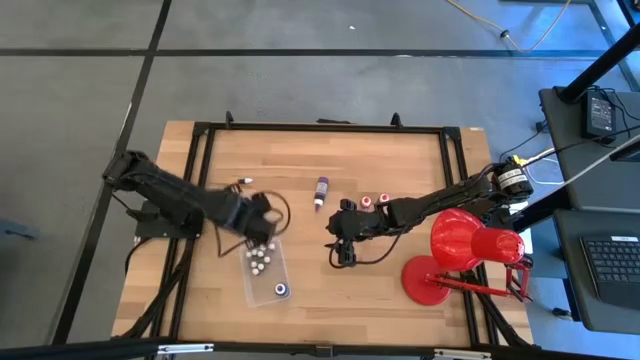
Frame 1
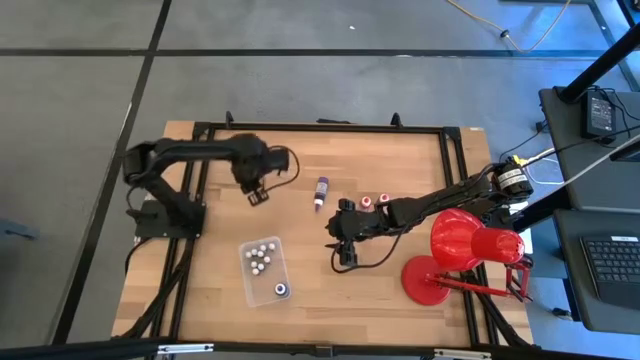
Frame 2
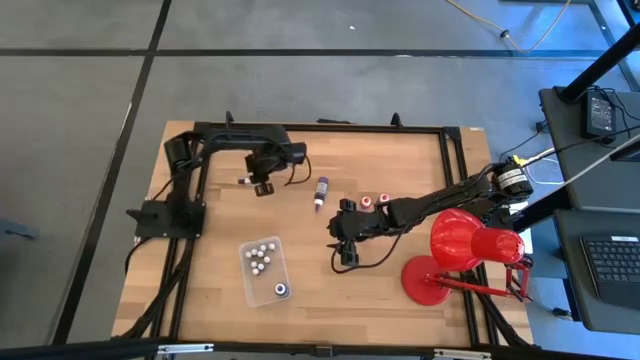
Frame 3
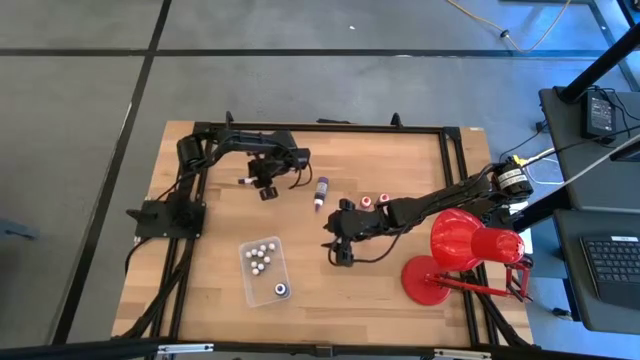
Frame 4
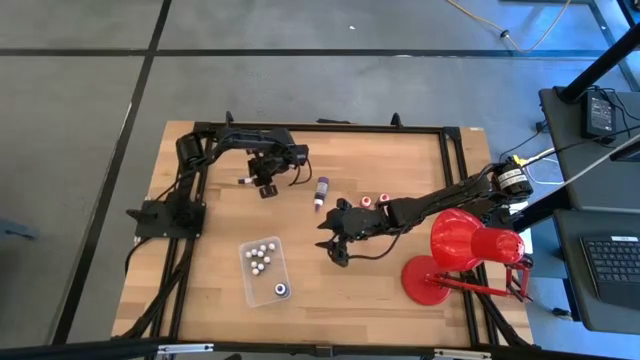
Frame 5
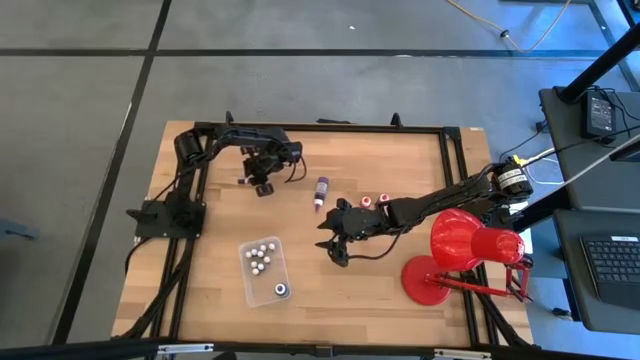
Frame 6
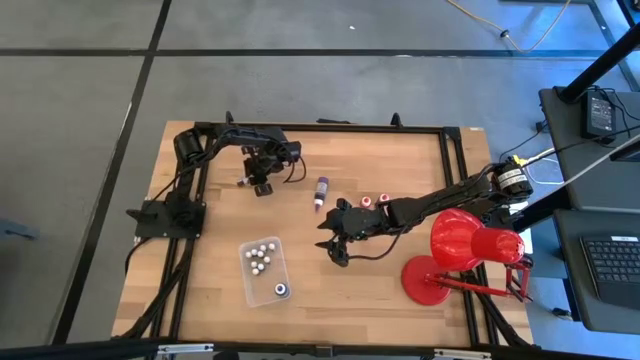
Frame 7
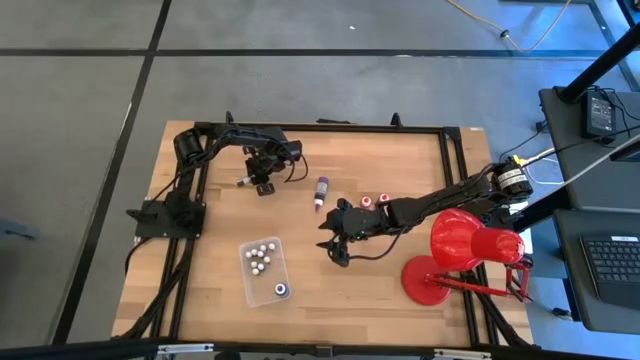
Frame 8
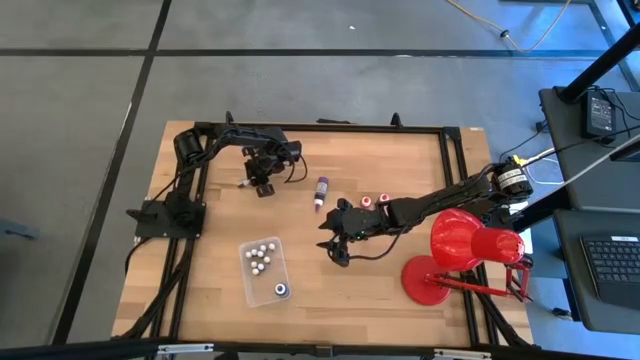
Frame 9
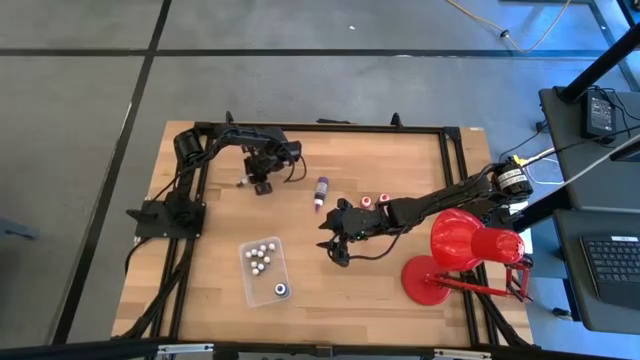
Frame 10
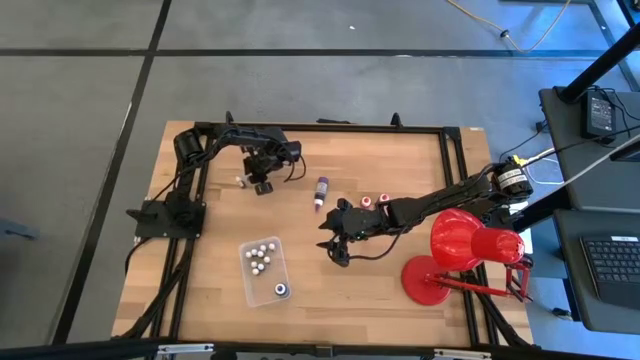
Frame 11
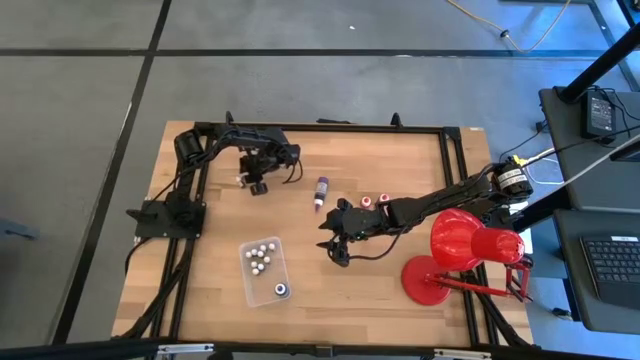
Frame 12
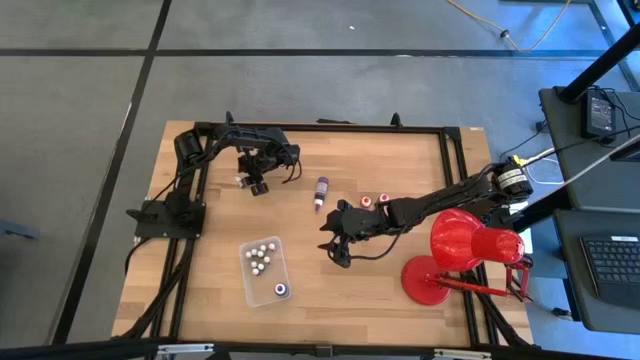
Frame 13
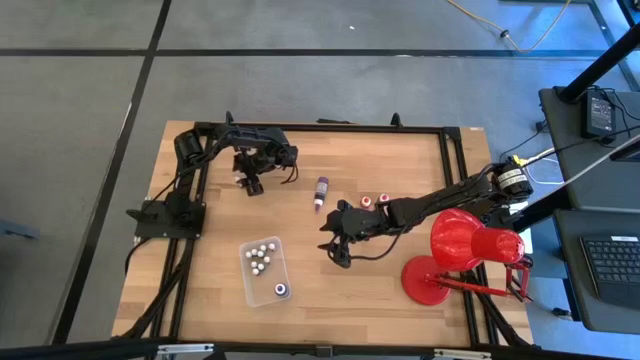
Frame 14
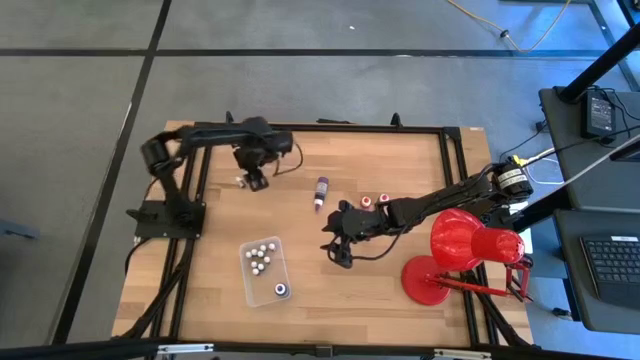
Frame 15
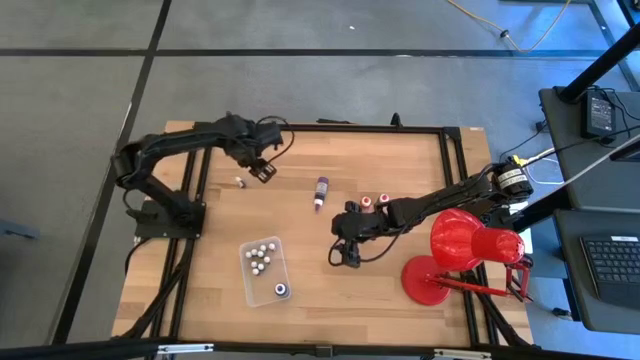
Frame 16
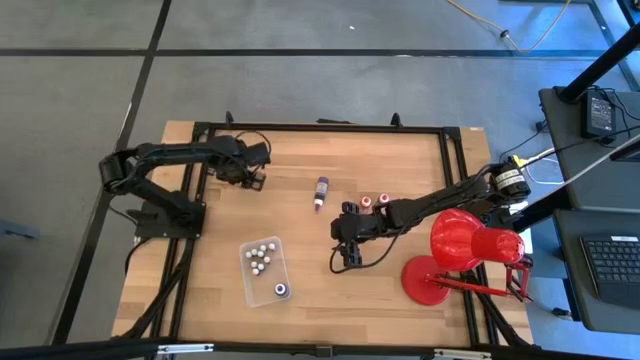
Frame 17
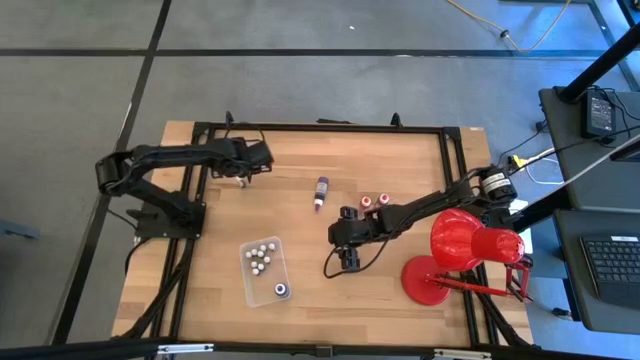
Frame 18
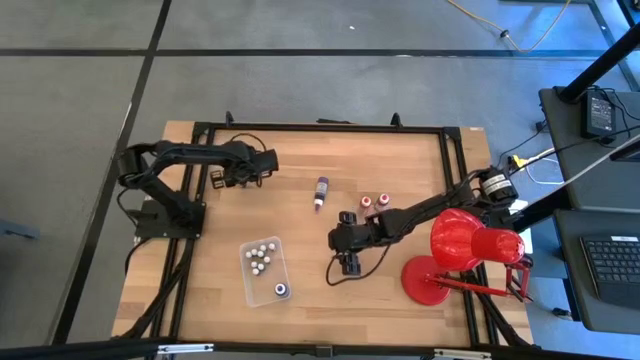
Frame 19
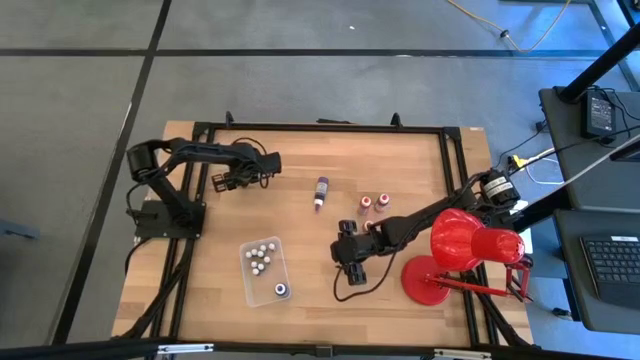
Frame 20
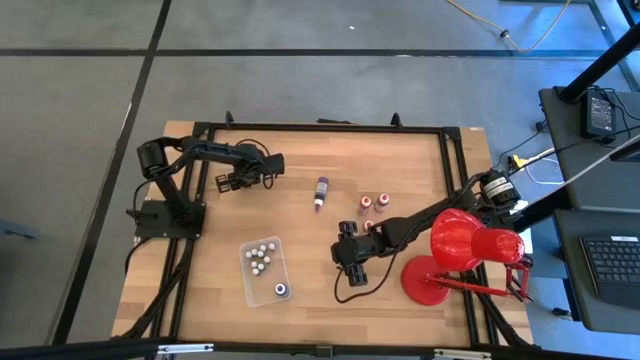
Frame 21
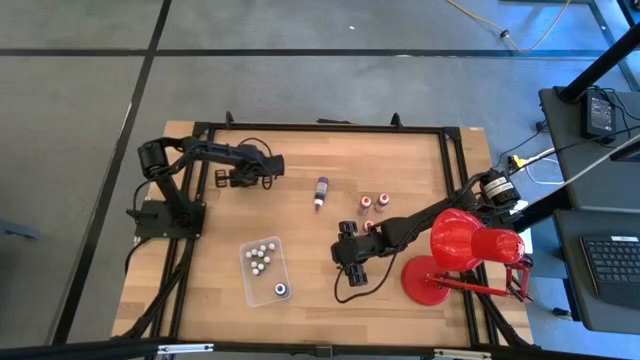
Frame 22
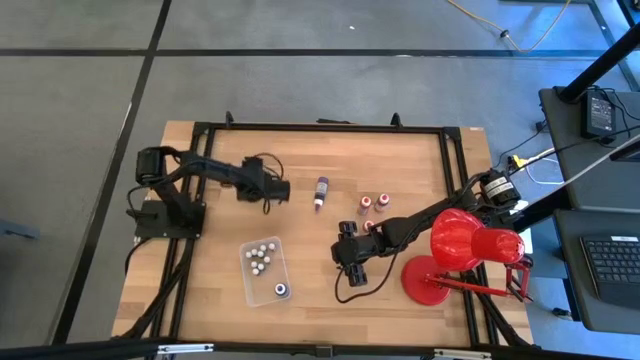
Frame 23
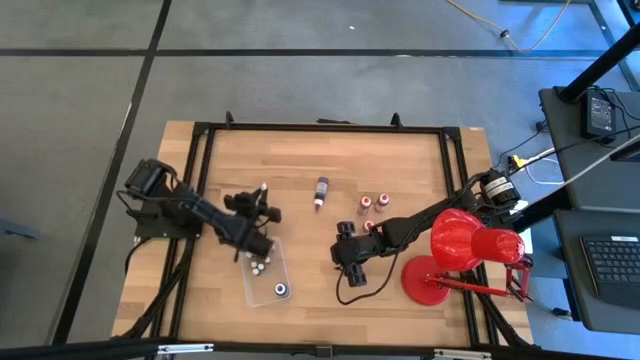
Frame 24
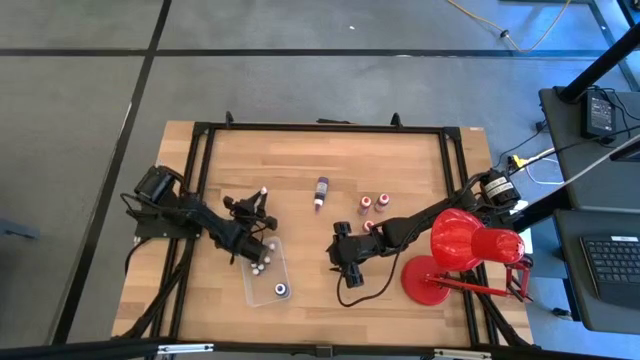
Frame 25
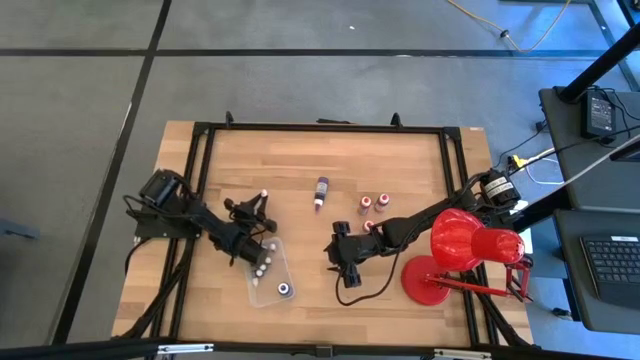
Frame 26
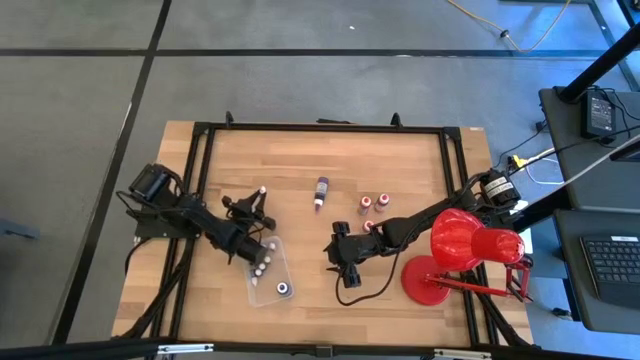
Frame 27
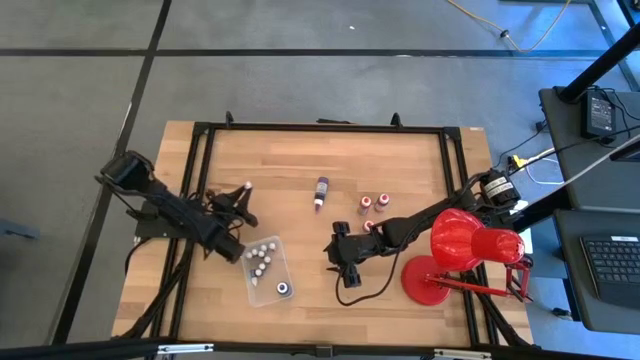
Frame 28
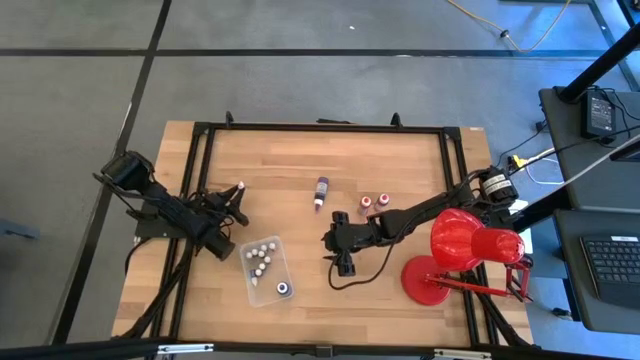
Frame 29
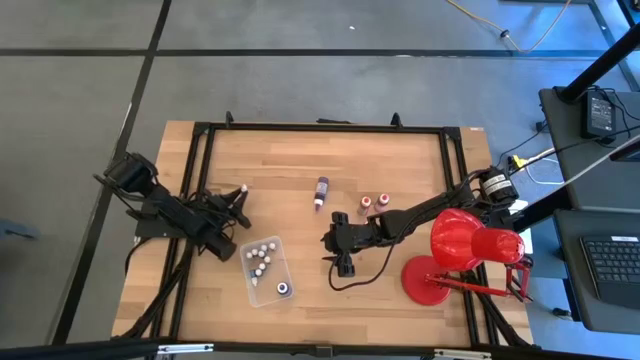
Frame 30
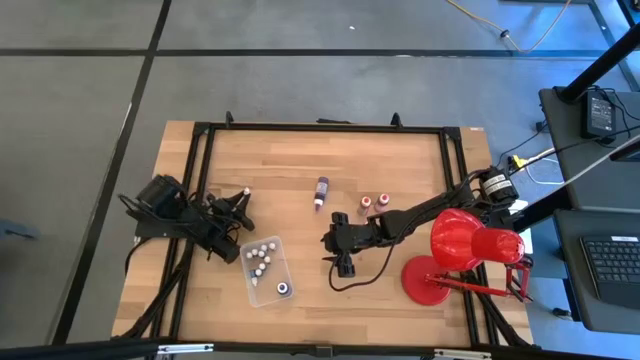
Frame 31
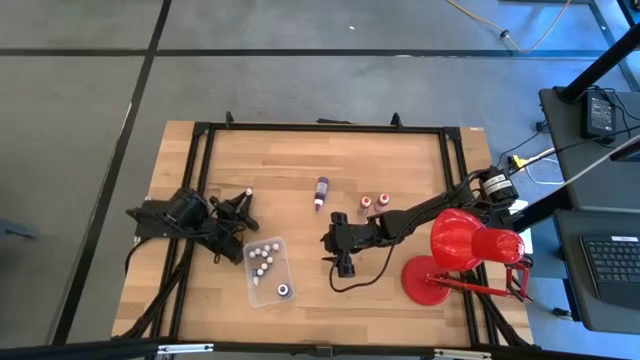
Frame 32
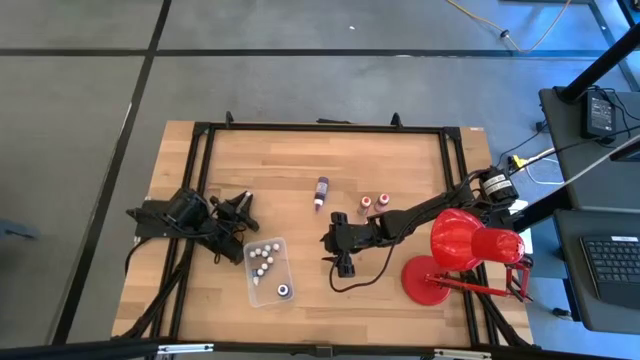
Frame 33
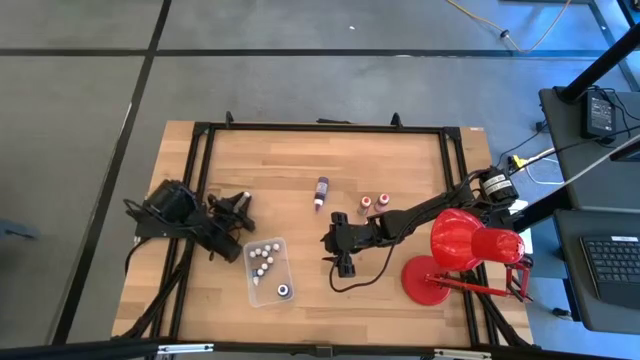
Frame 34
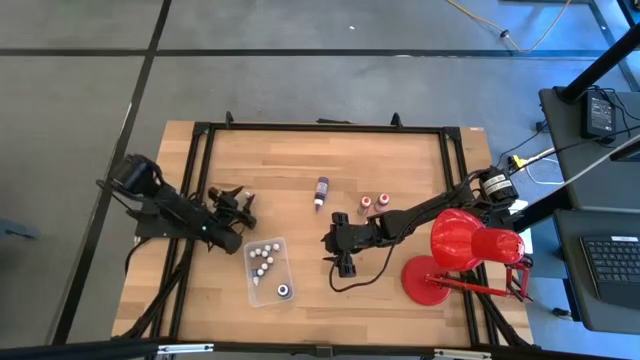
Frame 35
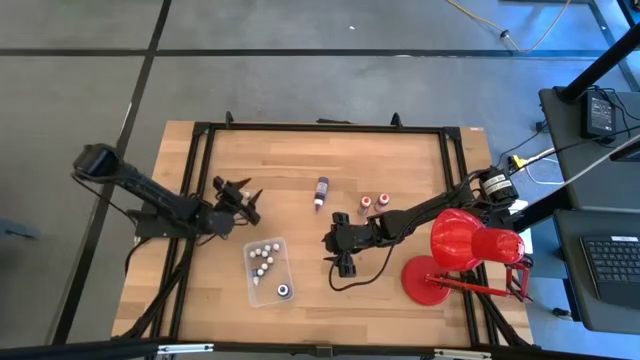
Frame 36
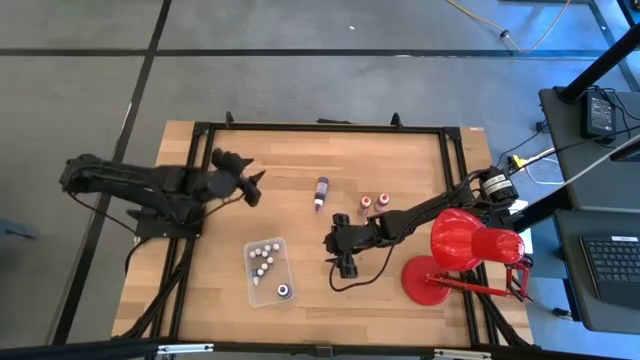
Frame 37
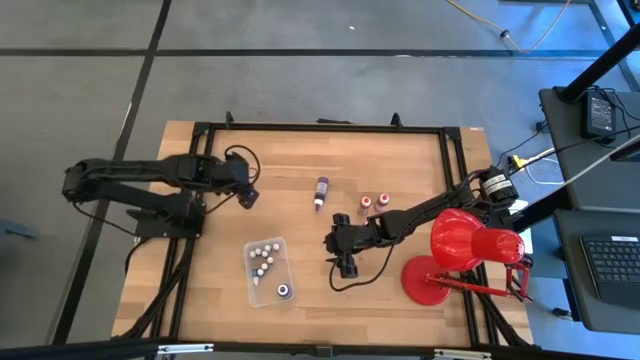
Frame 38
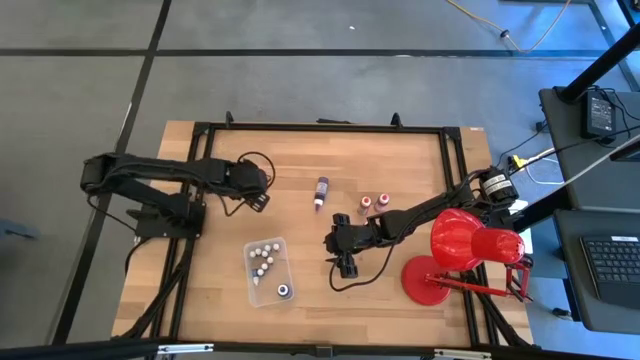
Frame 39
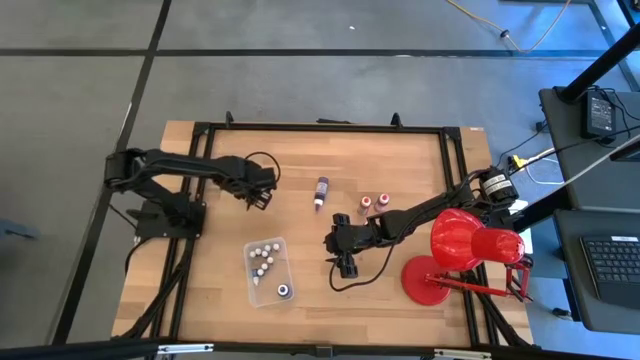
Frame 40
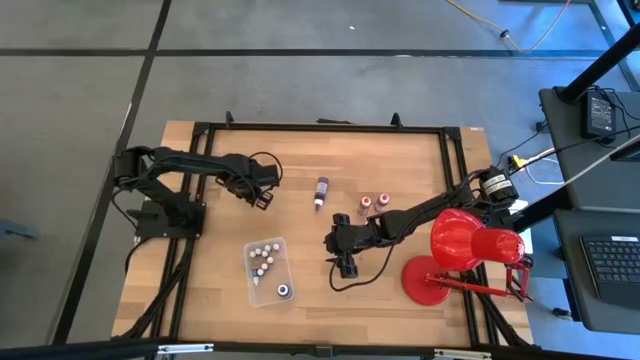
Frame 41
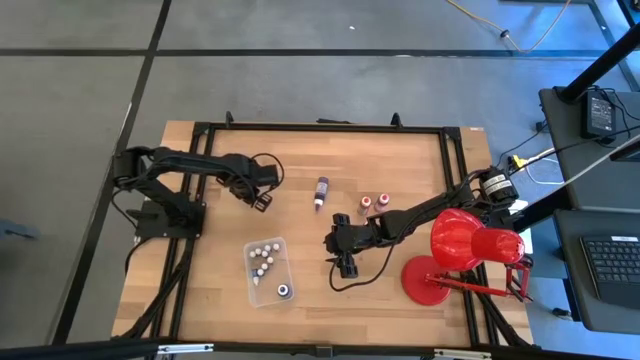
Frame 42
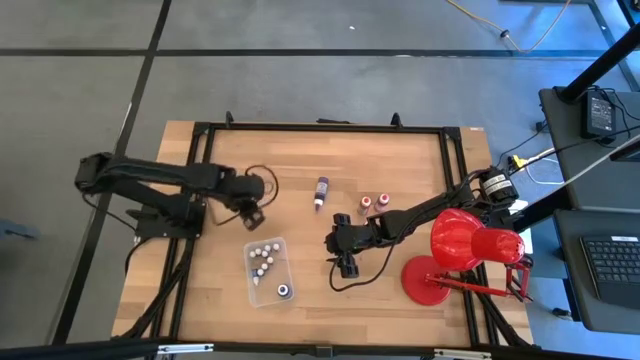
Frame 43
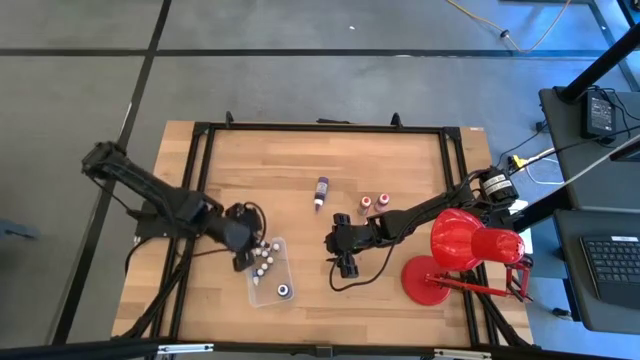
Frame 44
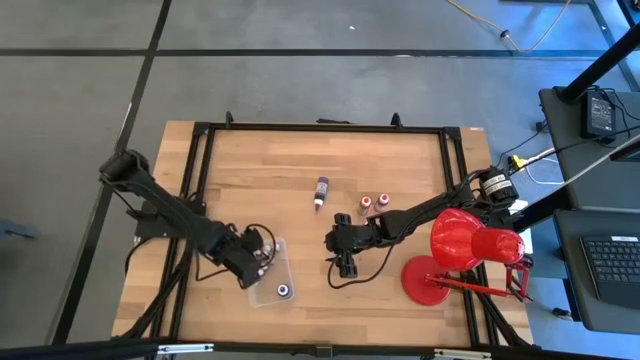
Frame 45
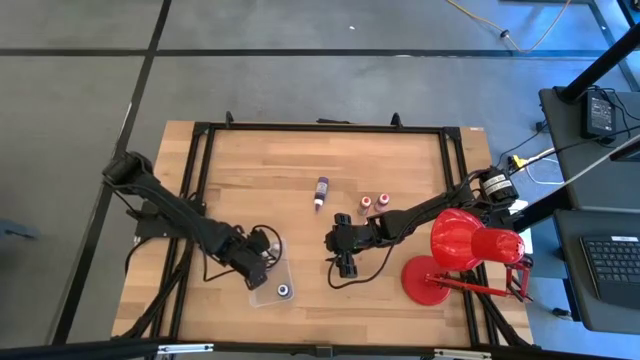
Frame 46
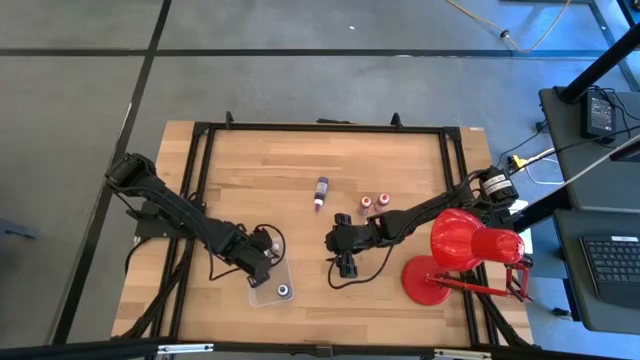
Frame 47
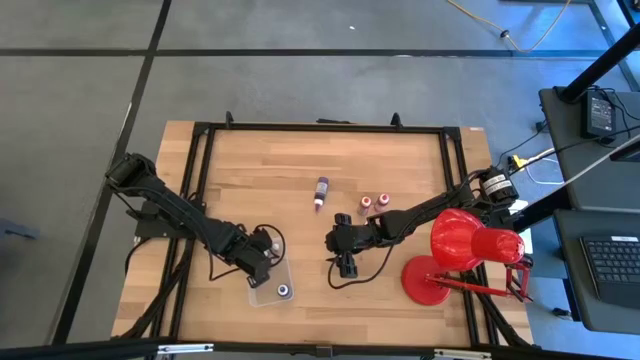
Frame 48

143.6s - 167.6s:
Task: Pick & Place food coloring
Put the small red food coloring bottle into the bin
